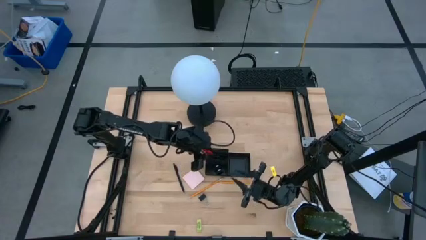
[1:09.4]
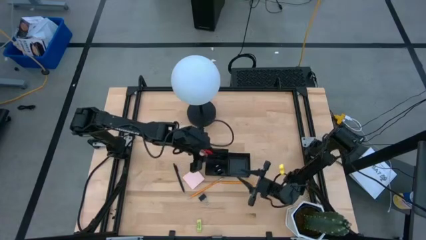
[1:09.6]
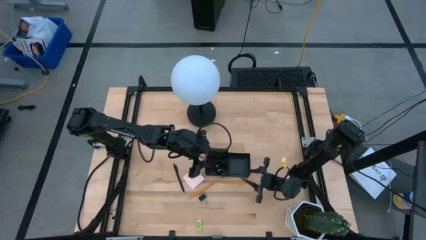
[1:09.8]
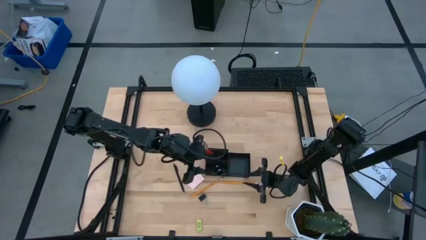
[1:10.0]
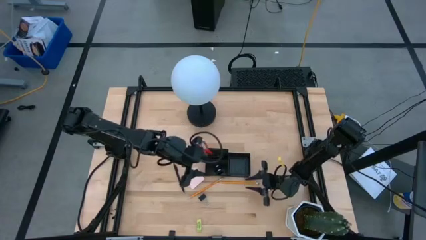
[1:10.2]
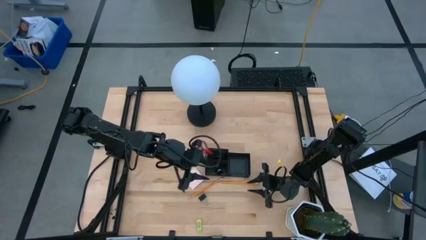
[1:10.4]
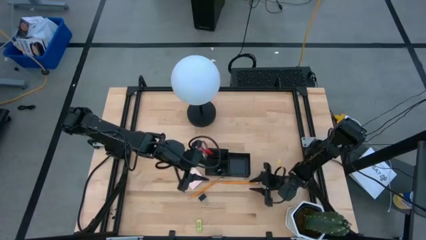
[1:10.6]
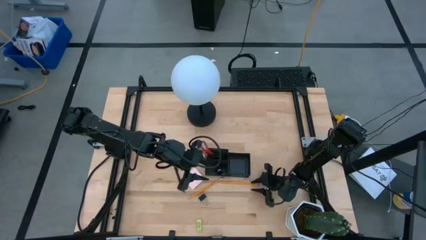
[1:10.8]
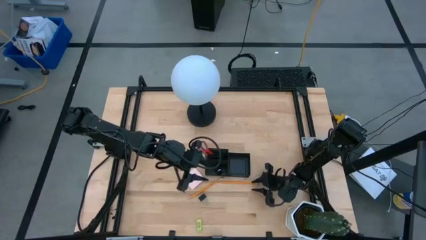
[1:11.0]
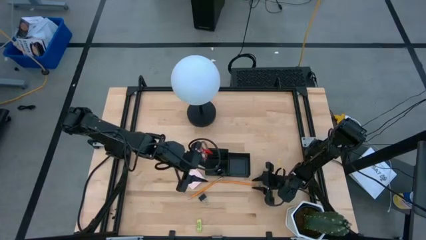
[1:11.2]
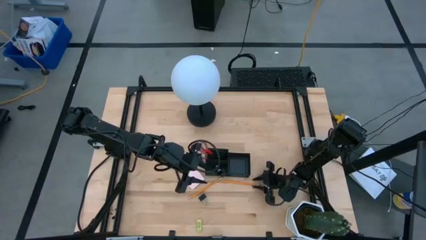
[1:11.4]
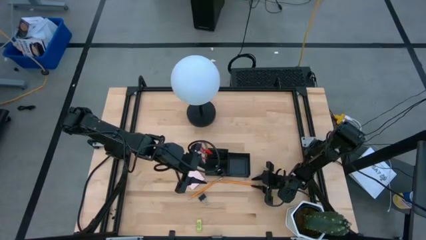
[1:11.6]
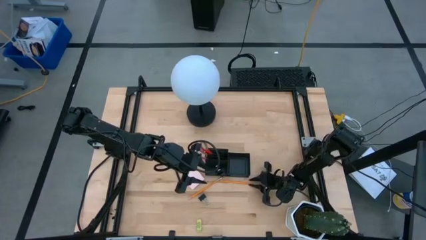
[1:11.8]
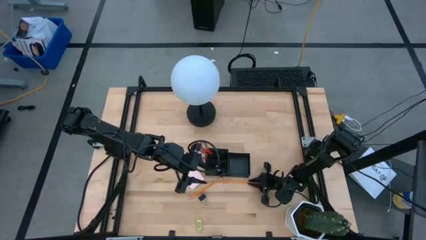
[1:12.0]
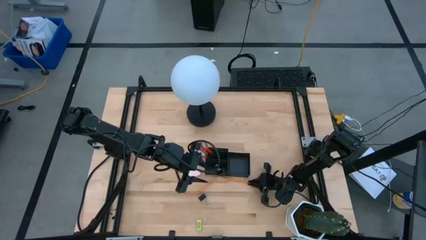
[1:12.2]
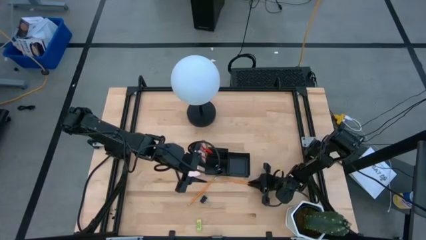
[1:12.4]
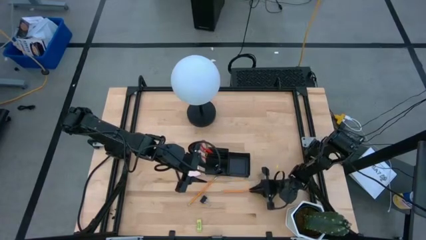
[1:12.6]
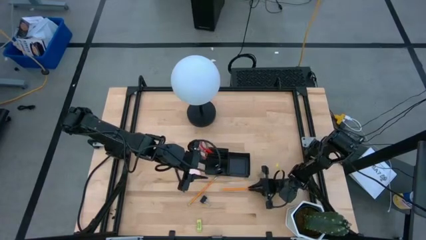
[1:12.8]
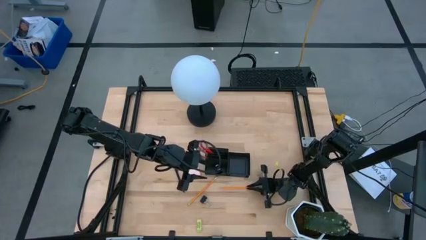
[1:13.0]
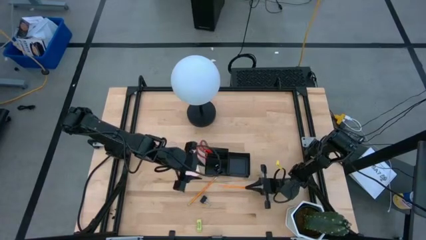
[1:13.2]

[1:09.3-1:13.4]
Task: Pick and place office supplies into organizer
Put the yellow pencil into the desk organizer

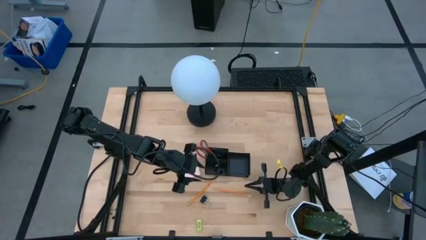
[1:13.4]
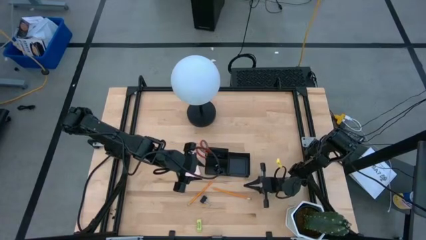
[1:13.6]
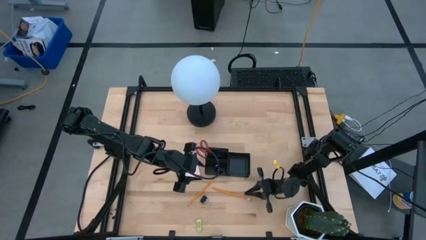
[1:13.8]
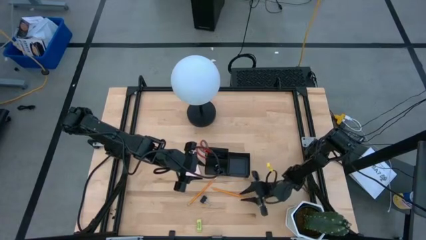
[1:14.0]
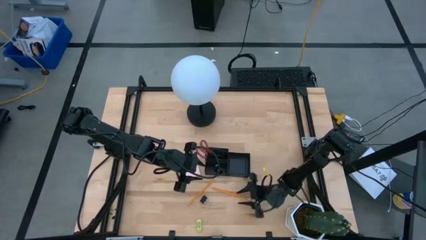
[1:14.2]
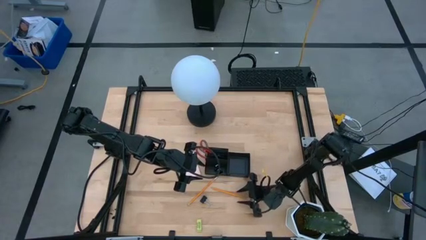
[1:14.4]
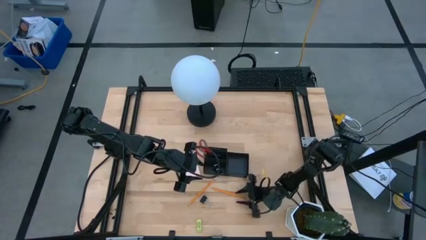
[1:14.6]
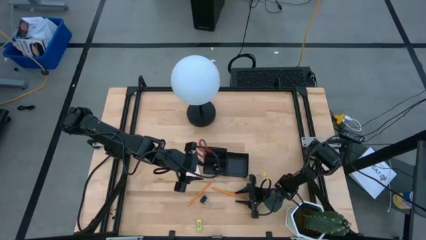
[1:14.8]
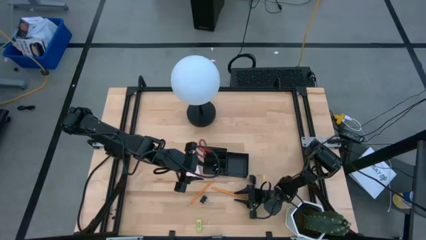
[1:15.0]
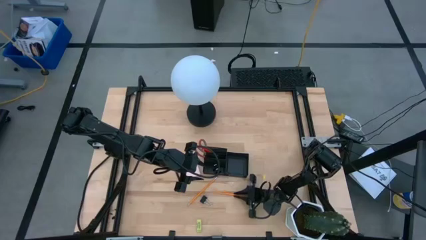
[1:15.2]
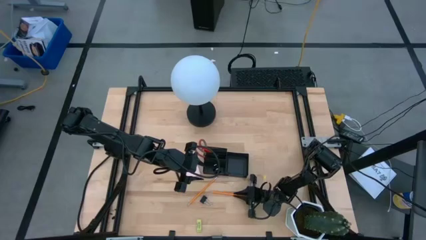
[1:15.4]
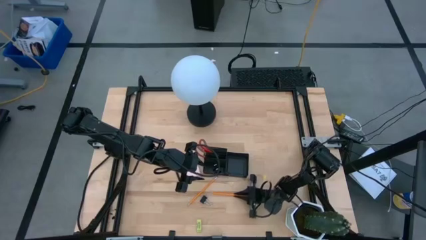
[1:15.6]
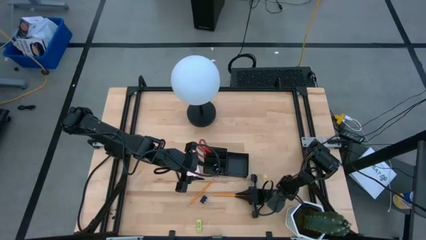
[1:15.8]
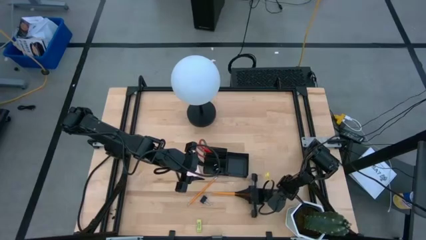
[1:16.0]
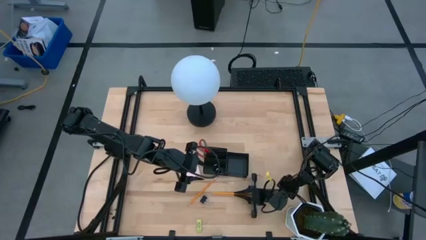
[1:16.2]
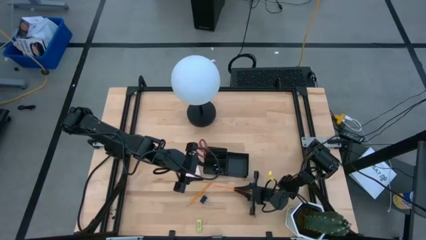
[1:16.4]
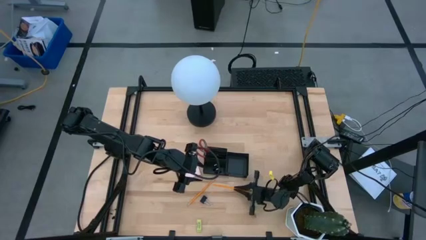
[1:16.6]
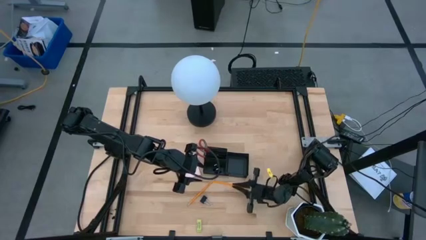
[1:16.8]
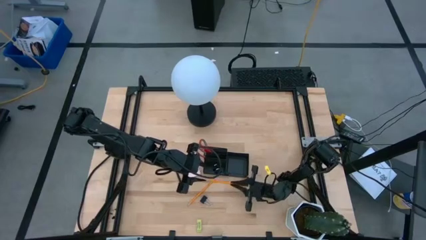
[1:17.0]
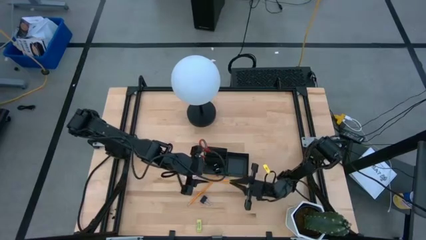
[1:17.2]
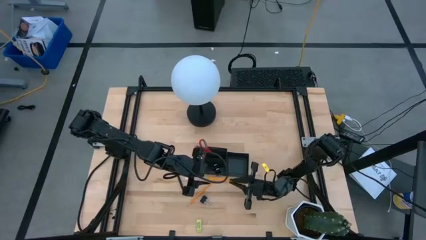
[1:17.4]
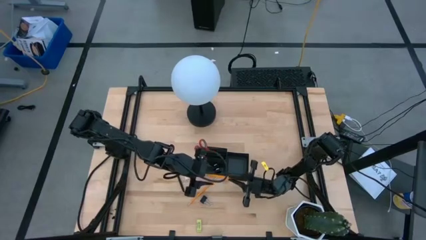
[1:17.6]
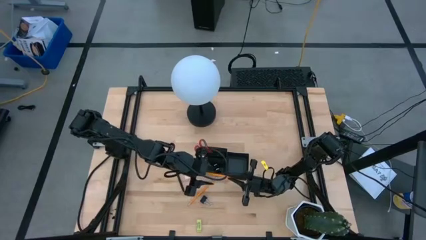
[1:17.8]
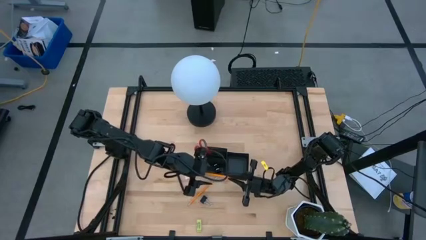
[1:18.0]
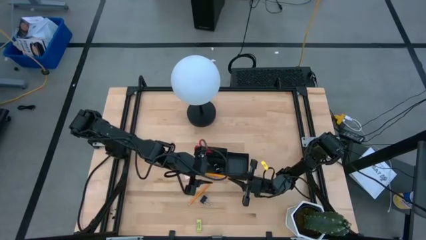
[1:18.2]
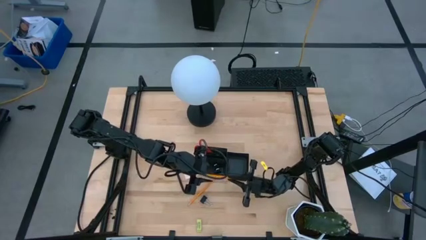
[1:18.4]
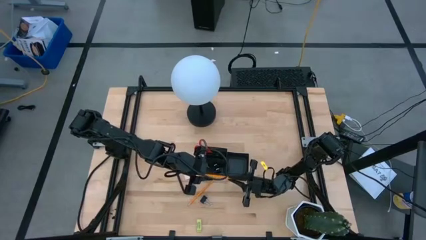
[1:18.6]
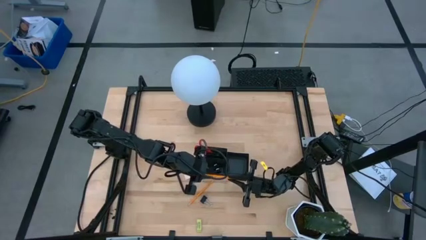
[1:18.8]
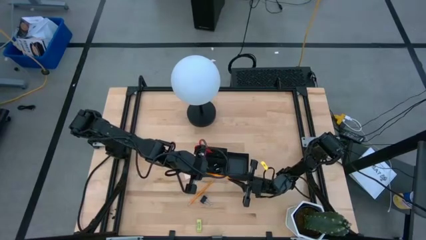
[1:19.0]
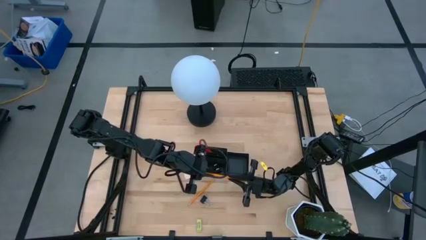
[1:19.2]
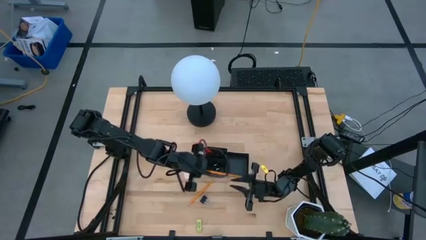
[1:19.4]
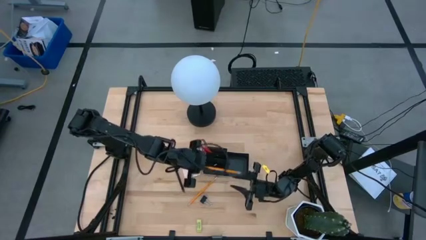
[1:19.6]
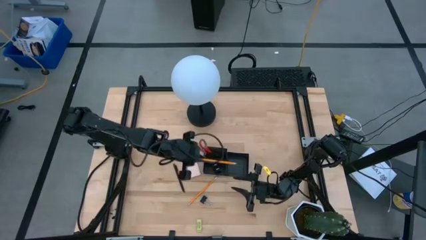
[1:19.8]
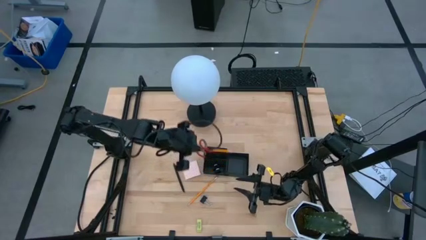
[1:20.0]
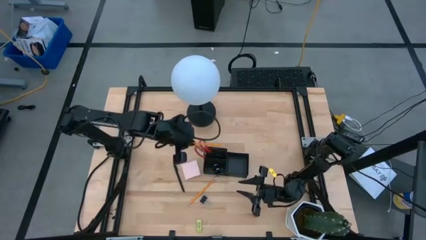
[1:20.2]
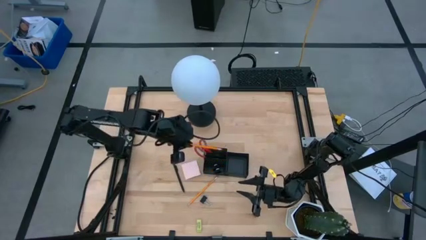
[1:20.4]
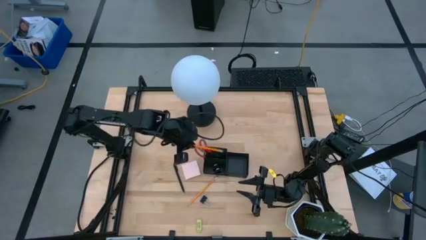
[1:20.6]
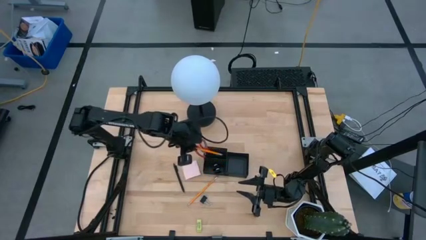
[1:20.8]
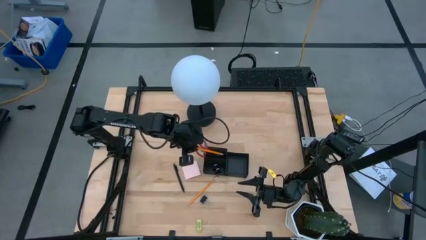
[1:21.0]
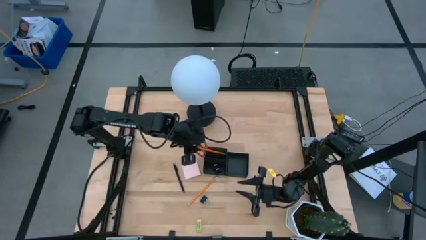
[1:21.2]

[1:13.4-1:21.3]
Put the yellow pencil into the desk organizer

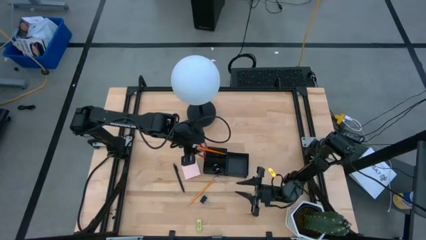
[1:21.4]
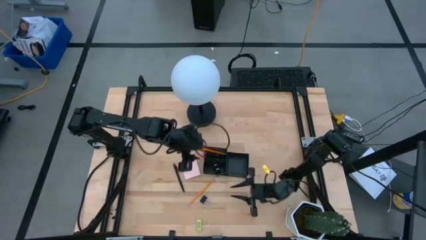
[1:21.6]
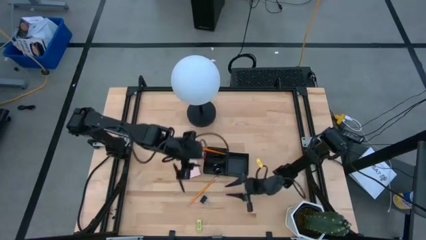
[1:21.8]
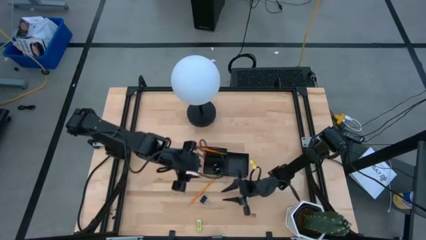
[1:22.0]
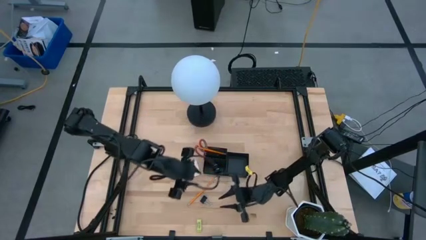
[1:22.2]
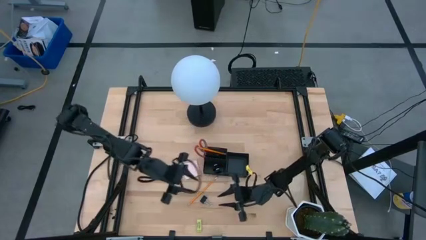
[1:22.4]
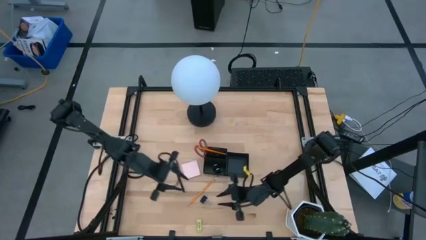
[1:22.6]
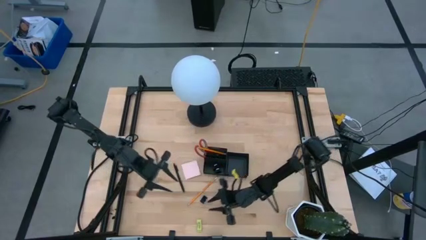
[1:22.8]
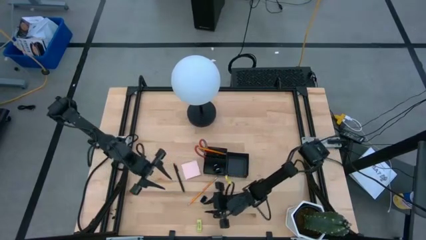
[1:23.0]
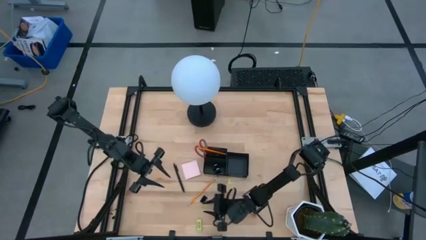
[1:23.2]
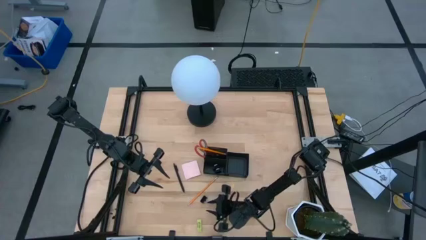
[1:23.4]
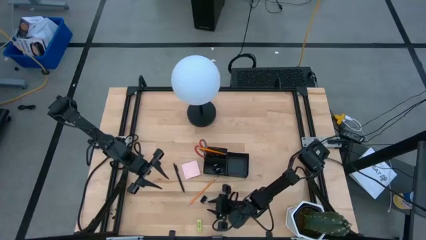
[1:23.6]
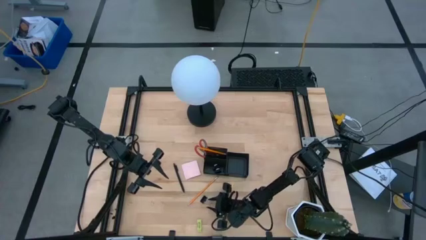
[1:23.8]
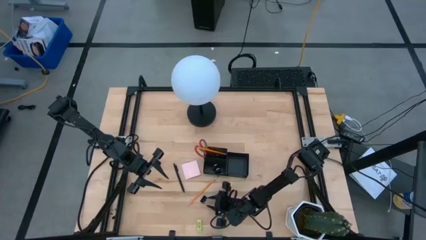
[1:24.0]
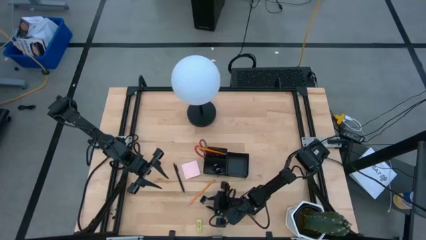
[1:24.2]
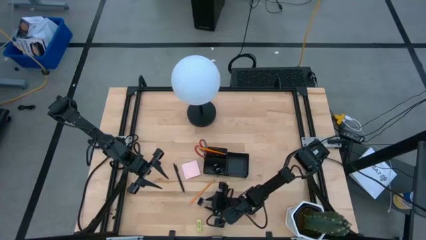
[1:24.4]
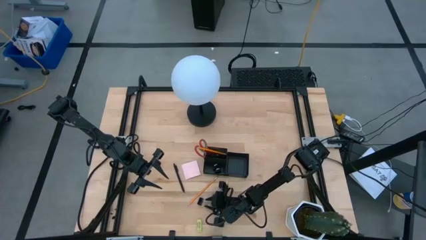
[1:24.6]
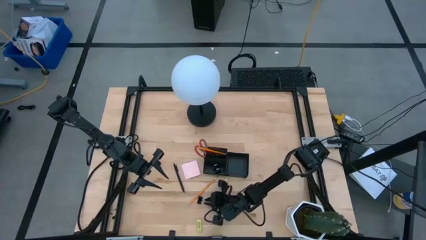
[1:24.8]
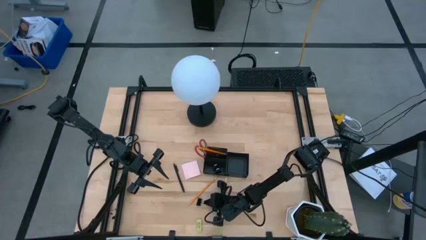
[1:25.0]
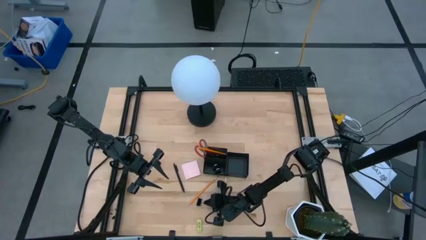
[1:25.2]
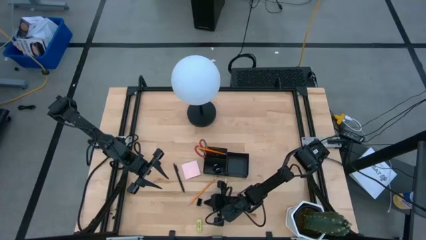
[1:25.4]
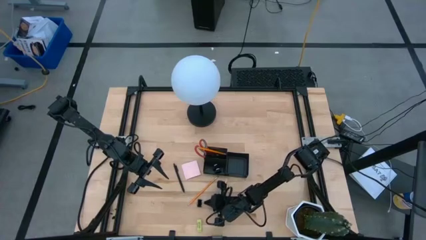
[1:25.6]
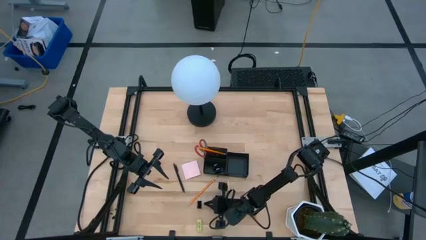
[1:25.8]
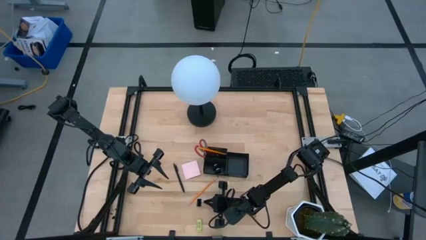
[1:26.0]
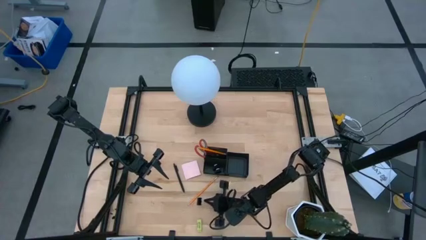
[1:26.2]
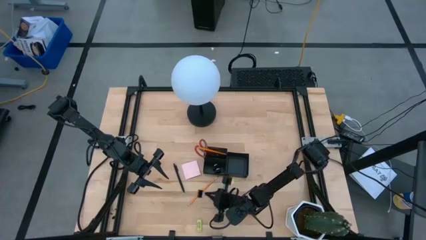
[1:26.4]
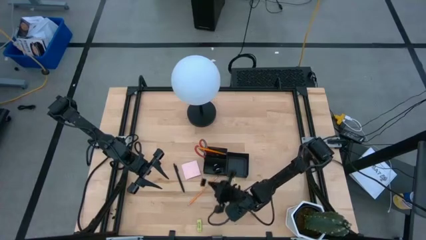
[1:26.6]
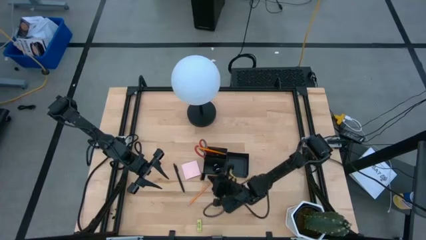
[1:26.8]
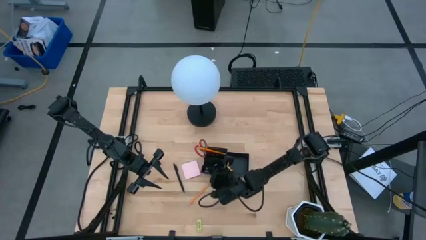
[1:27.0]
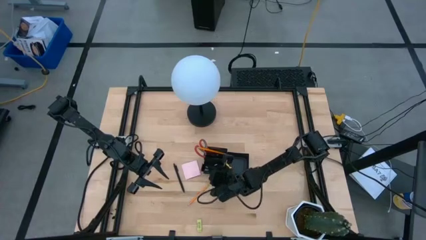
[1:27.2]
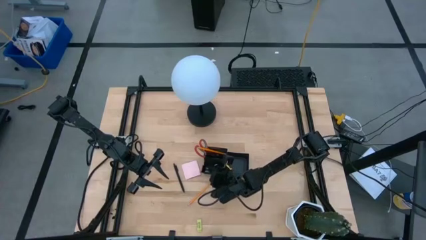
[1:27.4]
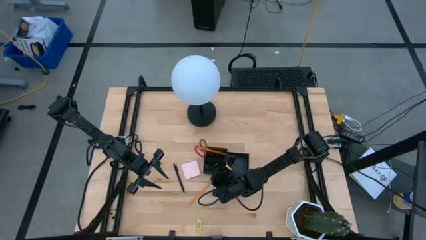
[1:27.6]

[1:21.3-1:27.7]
Put the binder clip into the desk organizer
